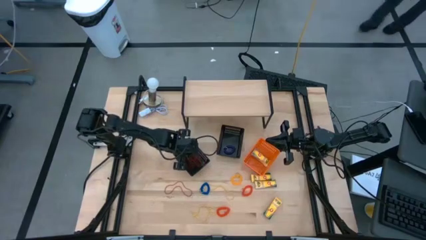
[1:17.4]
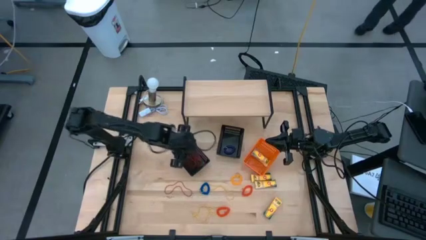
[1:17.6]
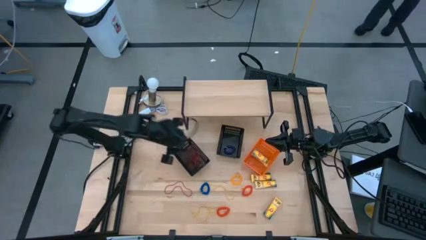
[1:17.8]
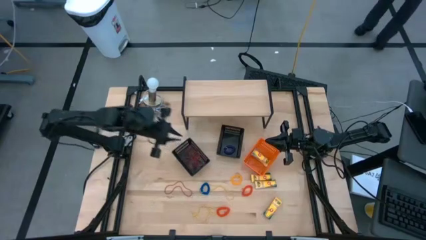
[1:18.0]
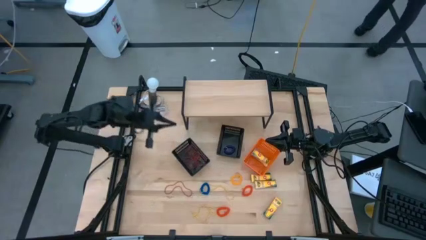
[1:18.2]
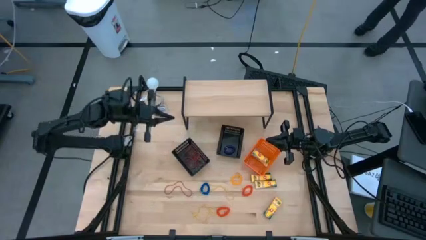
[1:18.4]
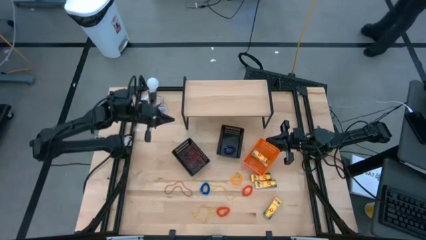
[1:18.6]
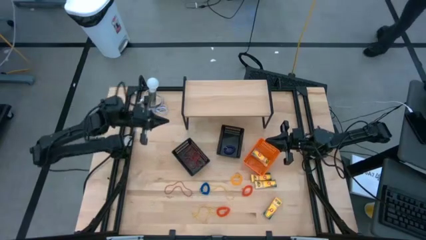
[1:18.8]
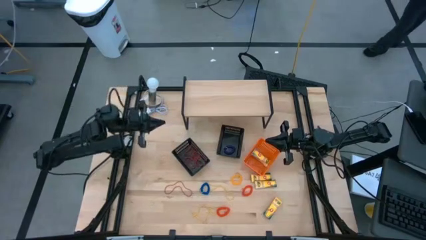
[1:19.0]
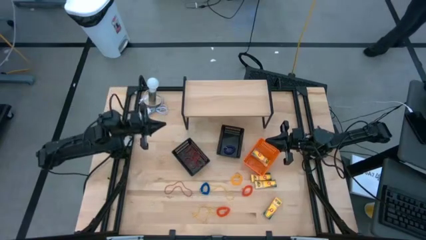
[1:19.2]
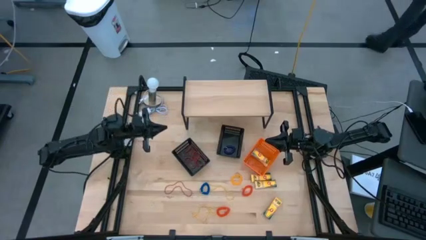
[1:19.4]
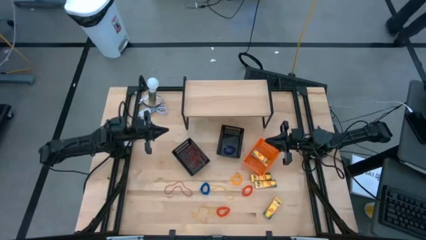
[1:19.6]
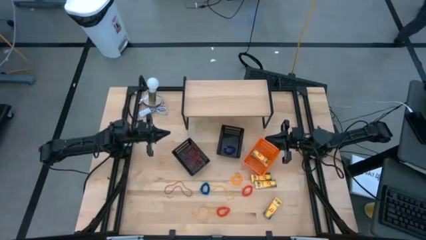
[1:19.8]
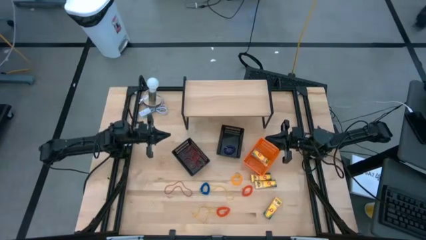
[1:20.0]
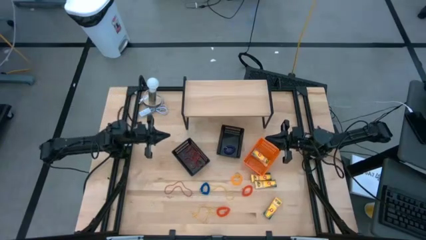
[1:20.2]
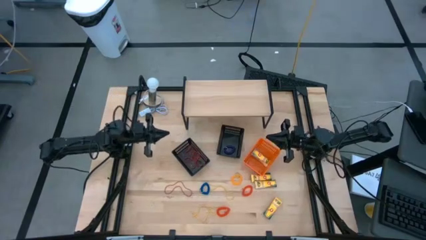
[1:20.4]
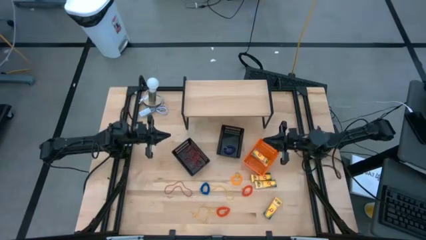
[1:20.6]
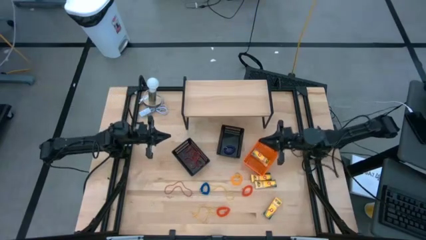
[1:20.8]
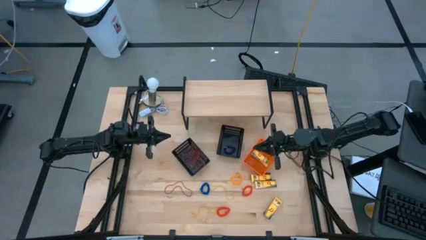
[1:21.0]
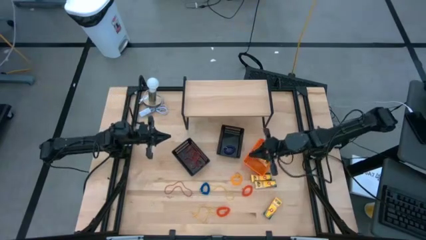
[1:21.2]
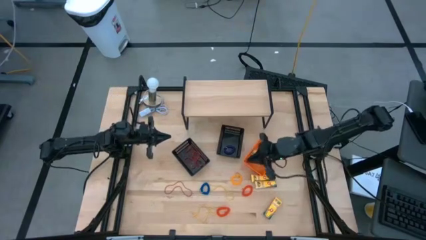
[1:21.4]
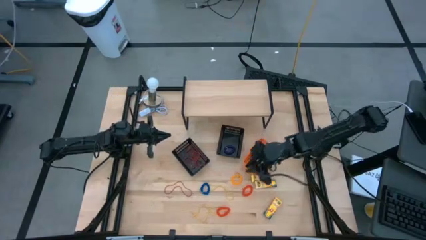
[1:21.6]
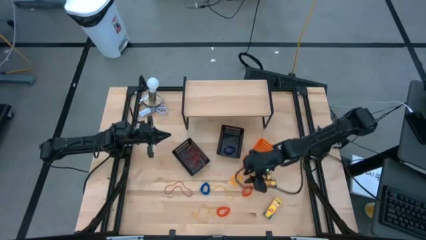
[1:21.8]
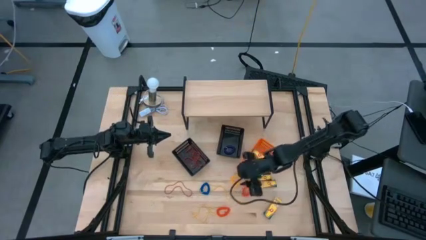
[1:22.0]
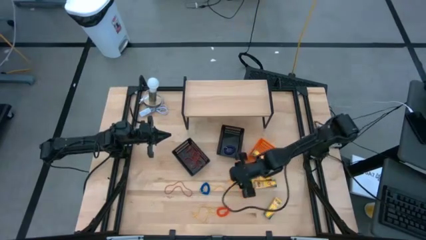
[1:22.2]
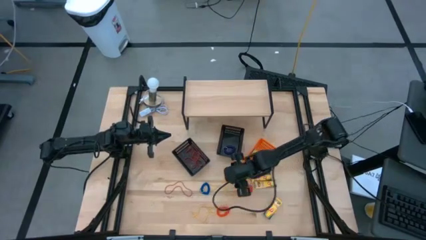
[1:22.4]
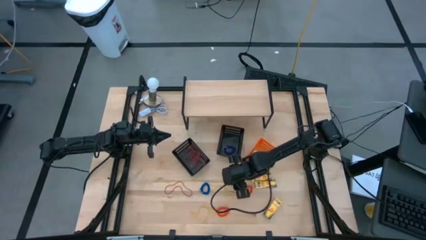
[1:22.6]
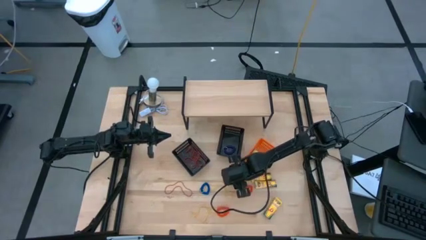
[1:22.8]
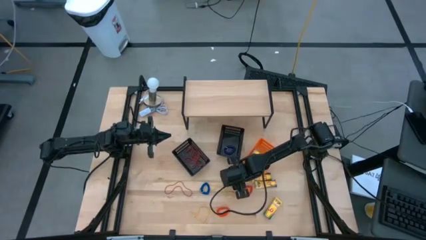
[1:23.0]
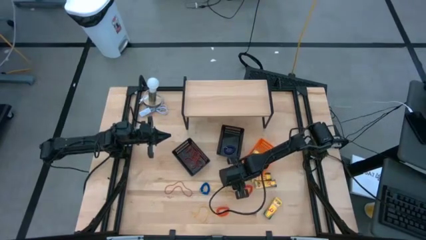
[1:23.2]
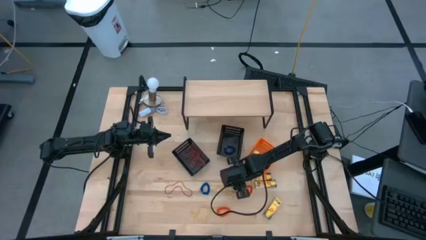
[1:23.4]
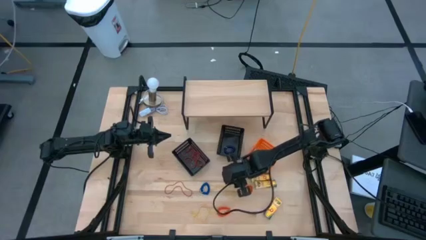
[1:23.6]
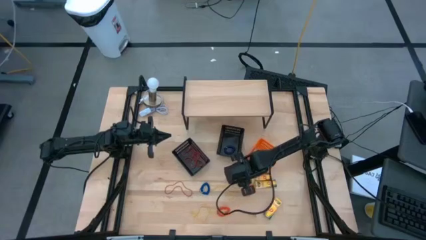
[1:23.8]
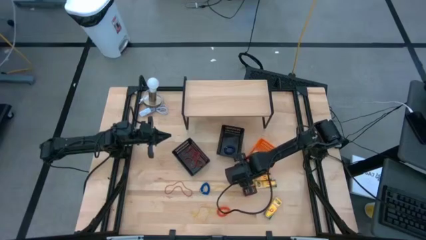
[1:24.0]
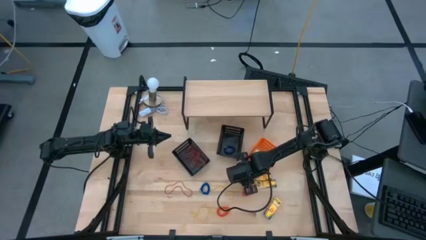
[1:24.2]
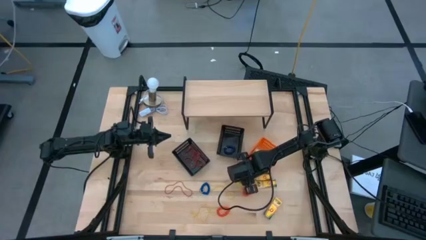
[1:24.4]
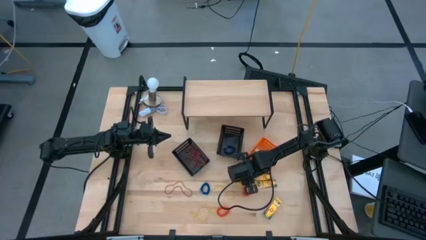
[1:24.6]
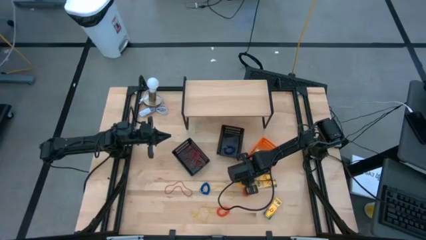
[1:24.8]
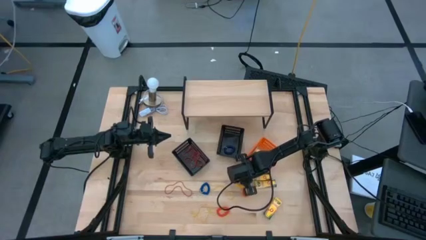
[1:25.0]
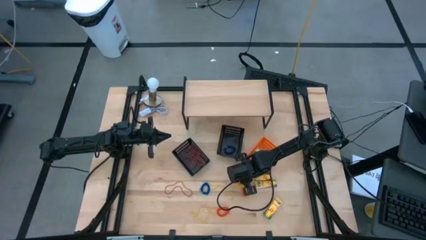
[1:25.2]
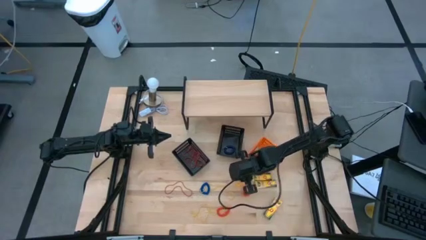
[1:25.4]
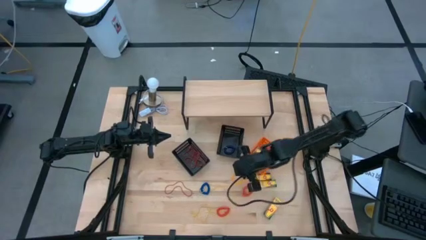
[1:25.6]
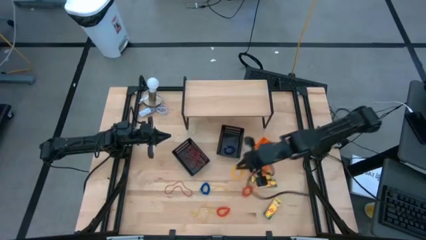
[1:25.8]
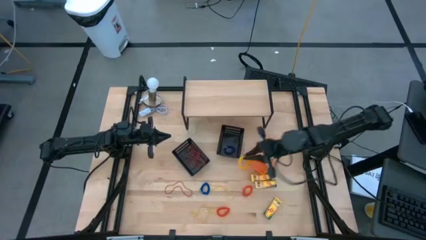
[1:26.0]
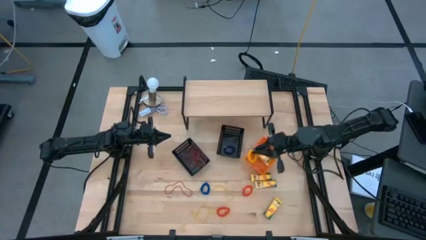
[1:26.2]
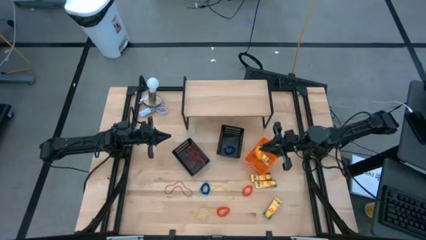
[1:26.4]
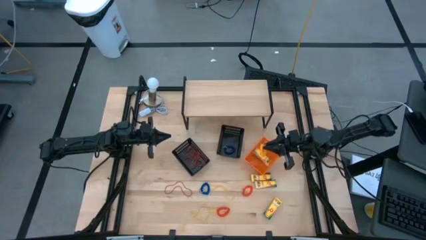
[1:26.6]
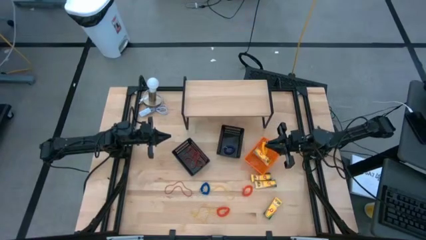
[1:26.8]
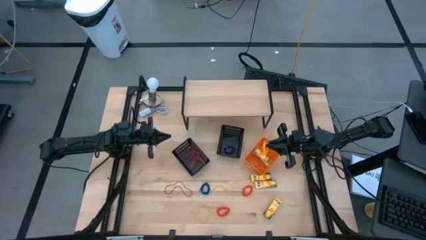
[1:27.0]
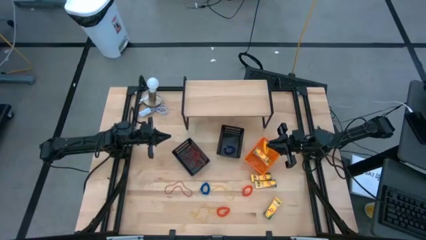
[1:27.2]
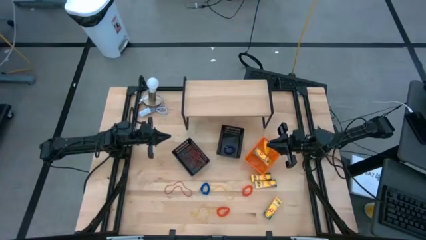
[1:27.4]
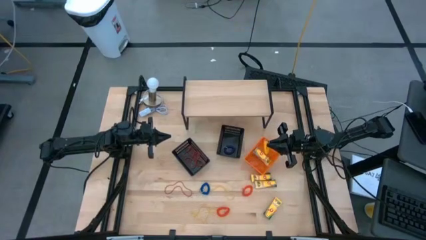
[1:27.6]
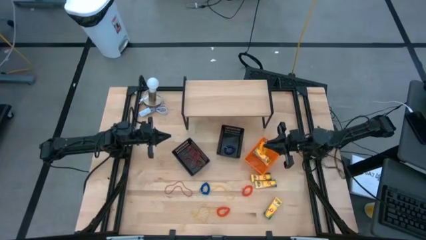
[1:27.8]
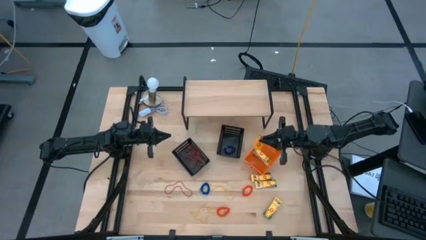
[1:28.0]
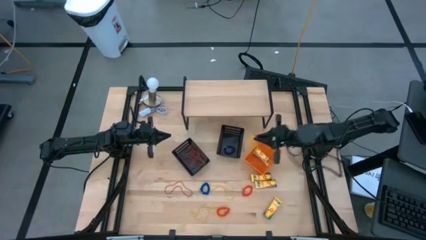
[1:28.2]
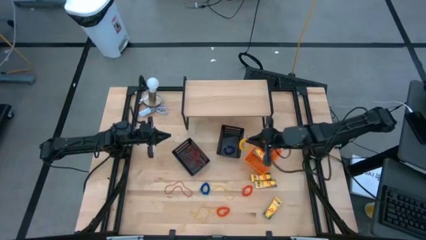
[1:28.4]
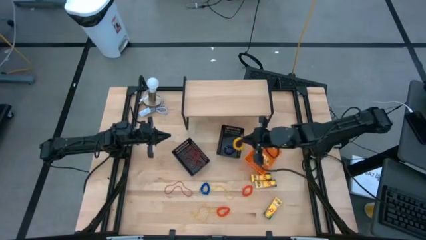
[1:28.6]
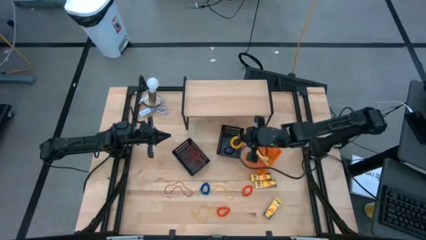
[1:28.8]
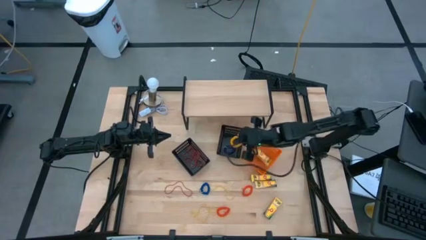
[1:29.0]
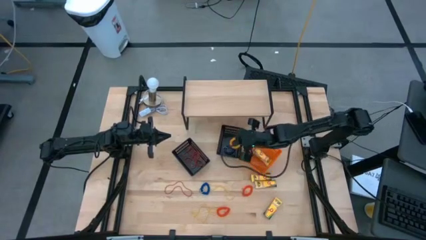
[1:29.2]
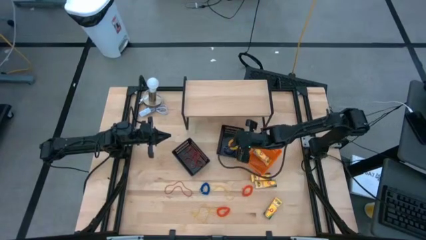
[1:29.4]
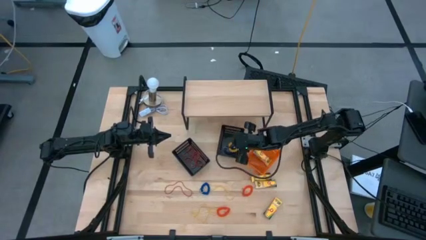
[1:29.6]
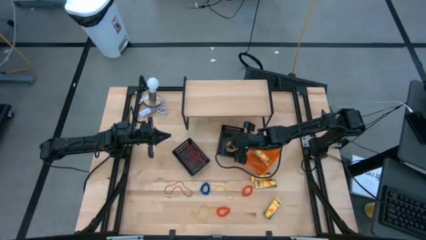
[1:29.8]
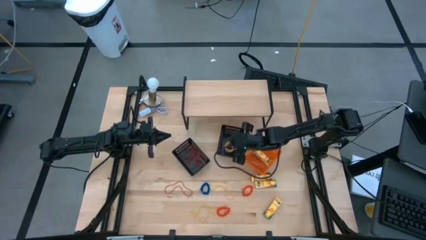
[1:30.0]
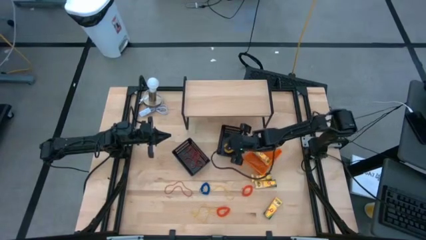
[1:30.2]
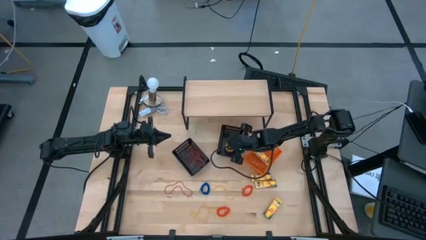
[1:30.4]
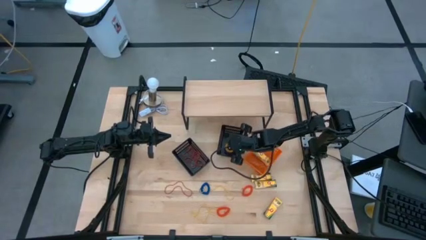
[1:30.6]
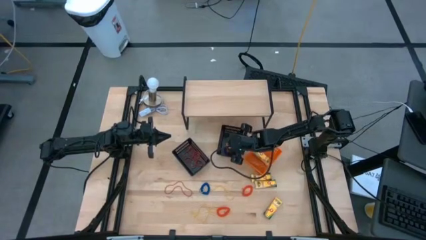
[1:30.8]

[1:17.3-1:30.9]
Task: Pick & Place Office Desk Supplies
Put the yellow spring keychain into the right black bin
